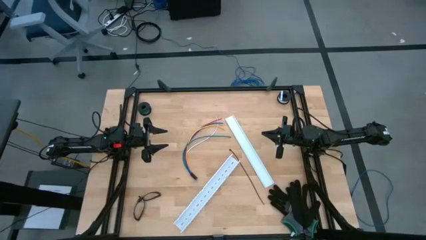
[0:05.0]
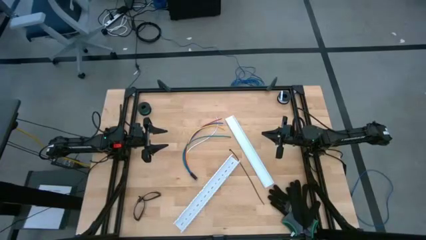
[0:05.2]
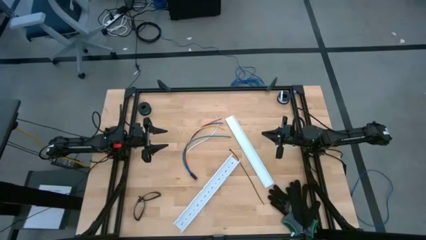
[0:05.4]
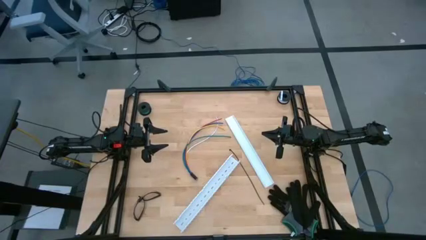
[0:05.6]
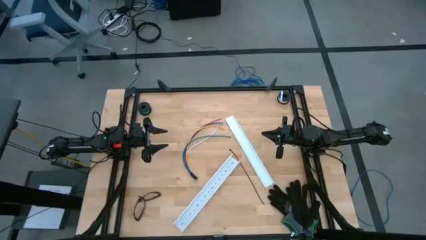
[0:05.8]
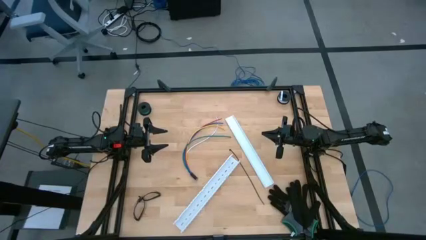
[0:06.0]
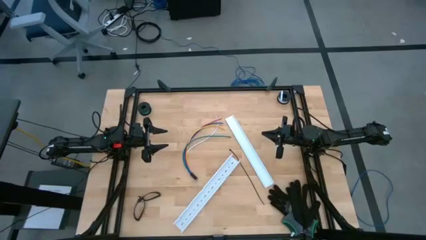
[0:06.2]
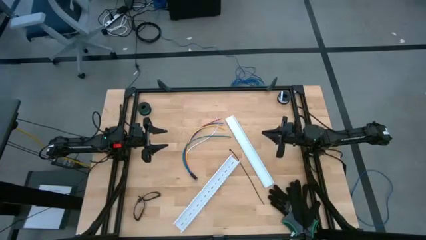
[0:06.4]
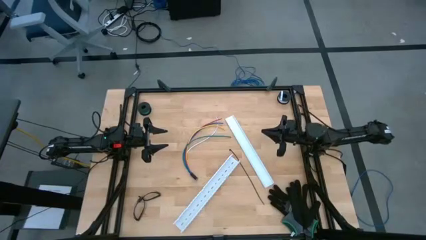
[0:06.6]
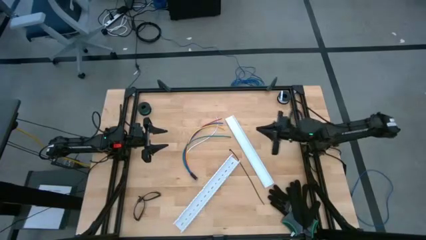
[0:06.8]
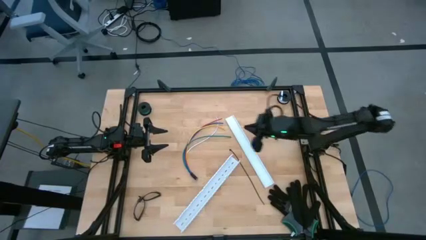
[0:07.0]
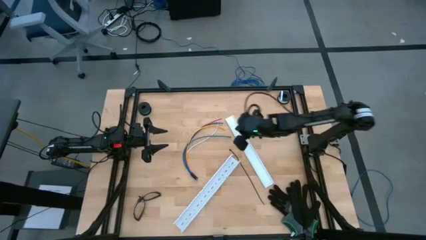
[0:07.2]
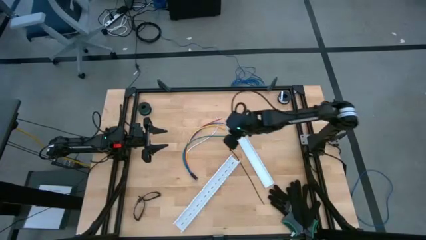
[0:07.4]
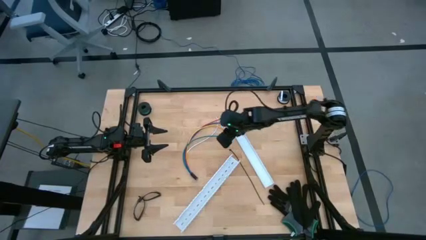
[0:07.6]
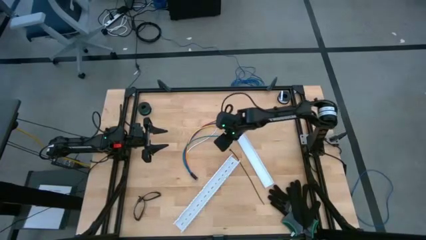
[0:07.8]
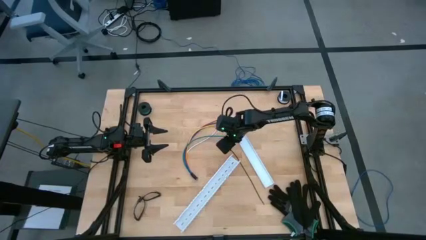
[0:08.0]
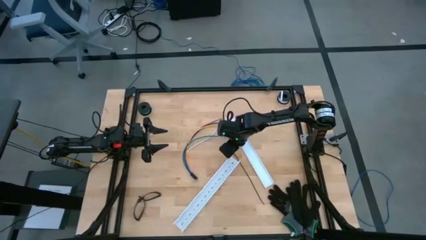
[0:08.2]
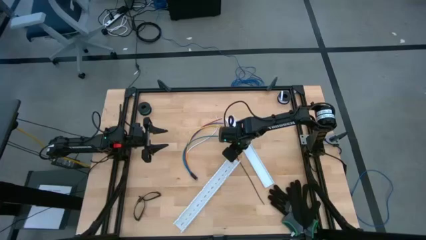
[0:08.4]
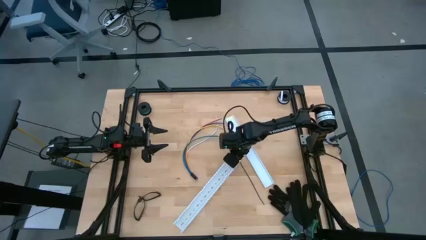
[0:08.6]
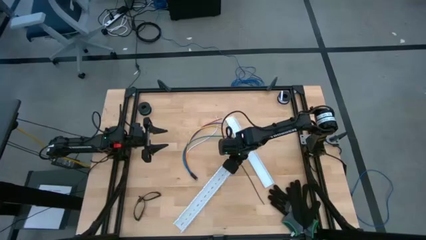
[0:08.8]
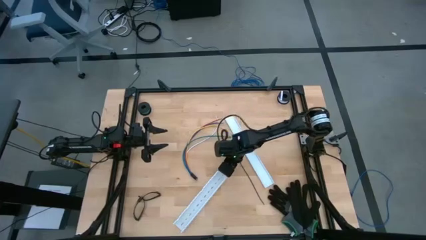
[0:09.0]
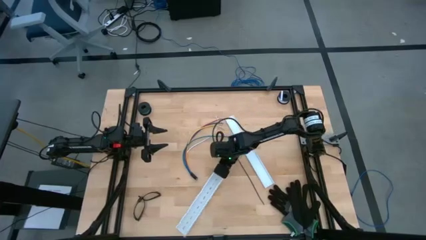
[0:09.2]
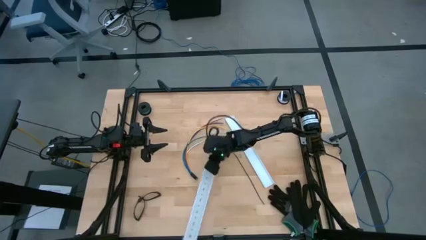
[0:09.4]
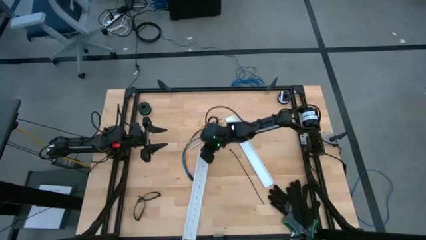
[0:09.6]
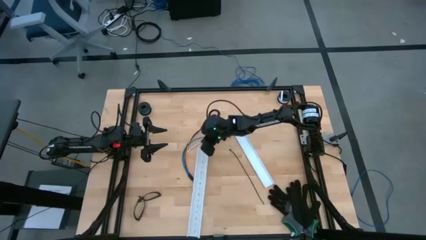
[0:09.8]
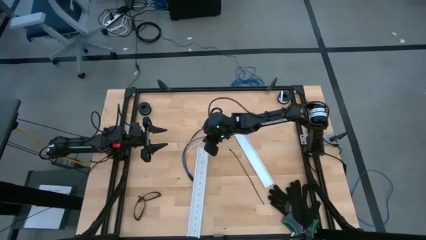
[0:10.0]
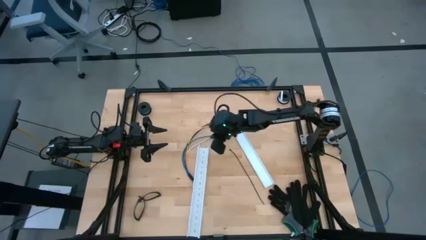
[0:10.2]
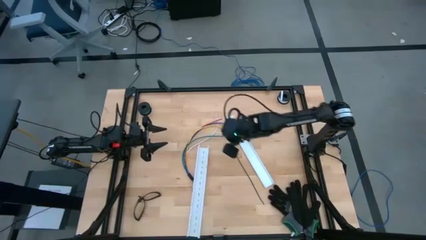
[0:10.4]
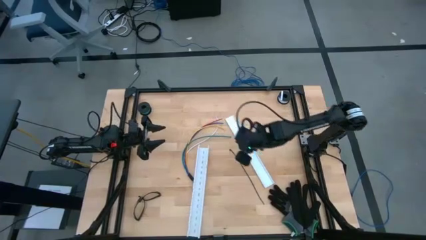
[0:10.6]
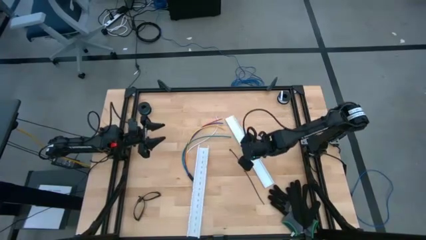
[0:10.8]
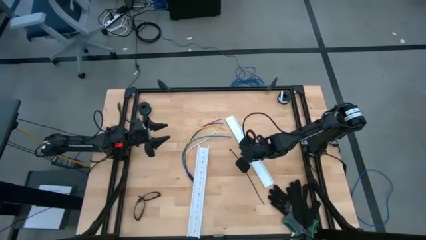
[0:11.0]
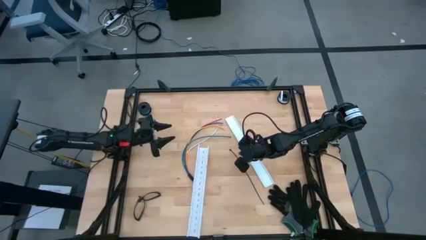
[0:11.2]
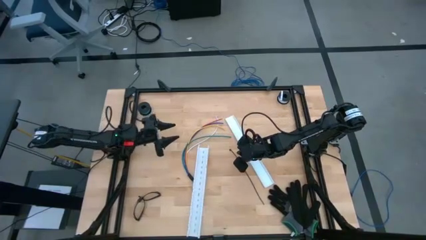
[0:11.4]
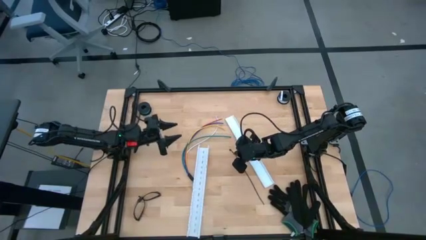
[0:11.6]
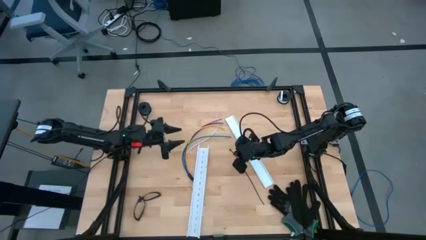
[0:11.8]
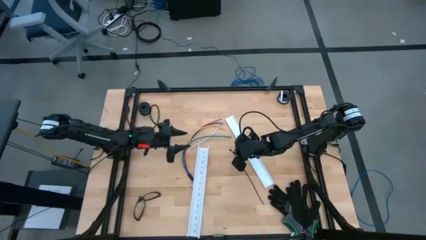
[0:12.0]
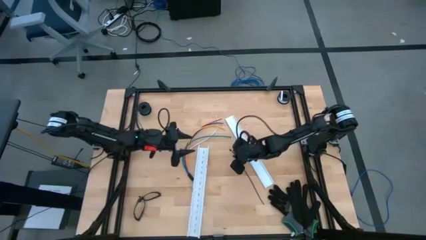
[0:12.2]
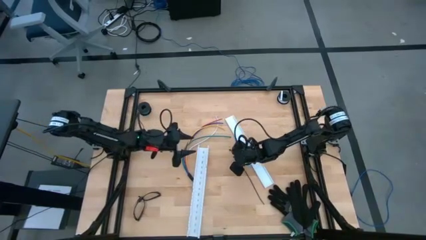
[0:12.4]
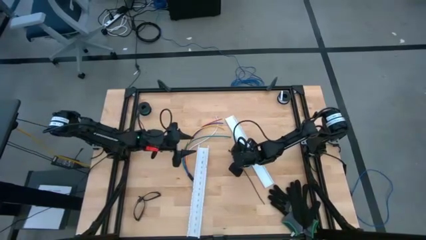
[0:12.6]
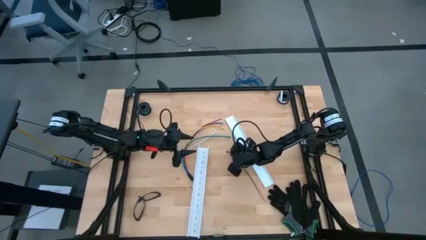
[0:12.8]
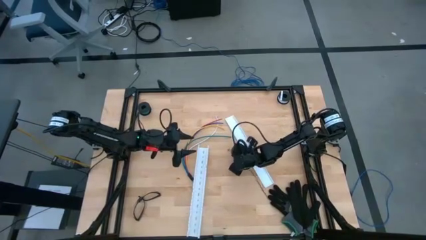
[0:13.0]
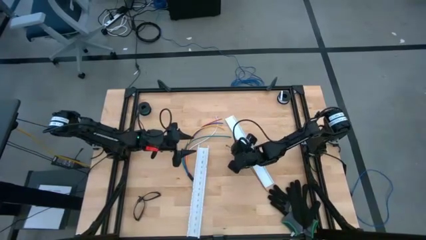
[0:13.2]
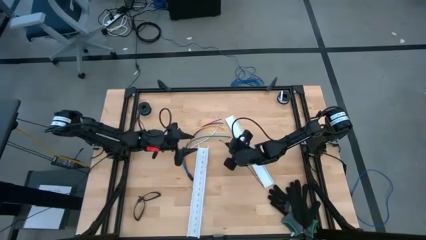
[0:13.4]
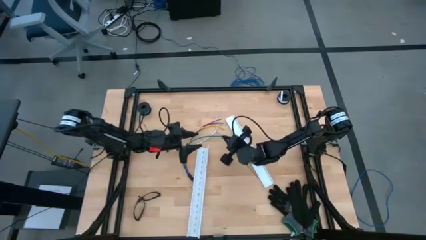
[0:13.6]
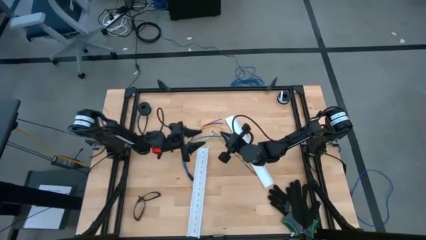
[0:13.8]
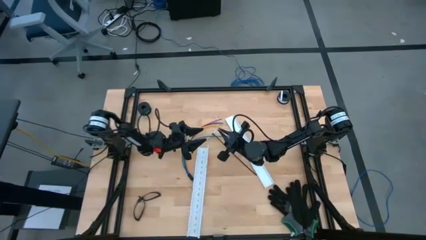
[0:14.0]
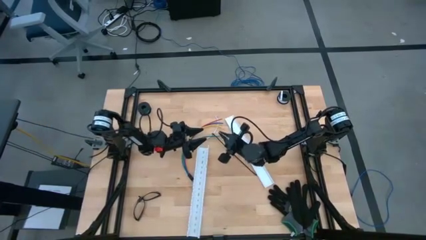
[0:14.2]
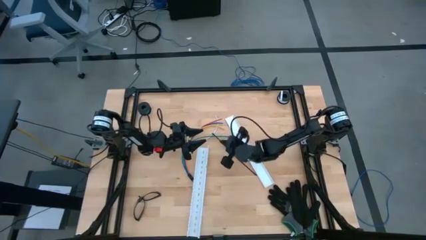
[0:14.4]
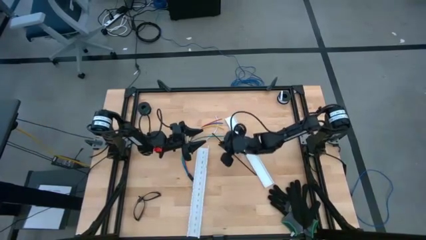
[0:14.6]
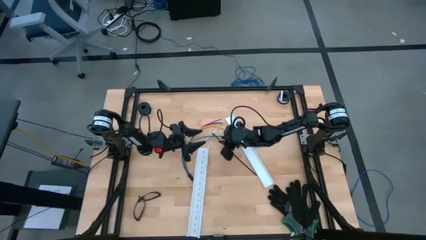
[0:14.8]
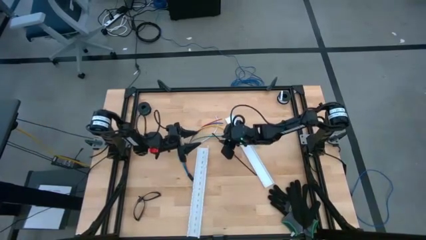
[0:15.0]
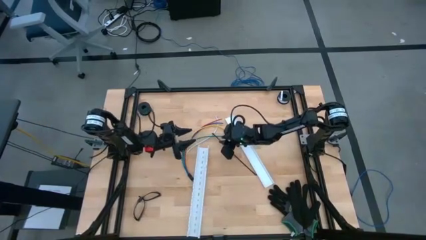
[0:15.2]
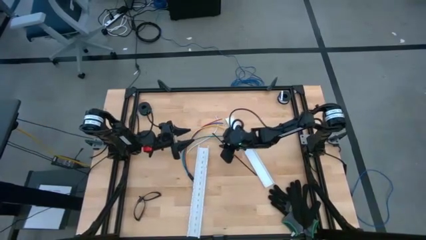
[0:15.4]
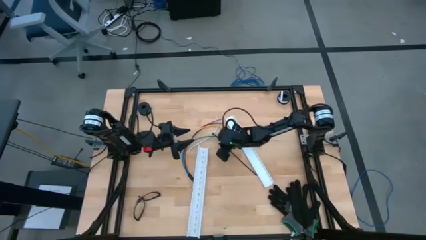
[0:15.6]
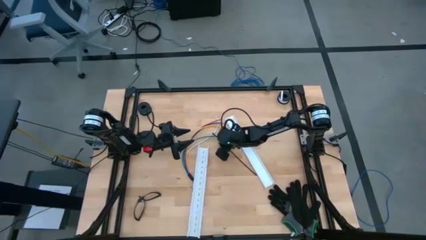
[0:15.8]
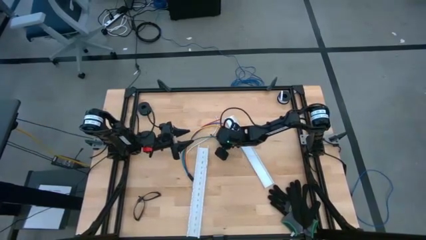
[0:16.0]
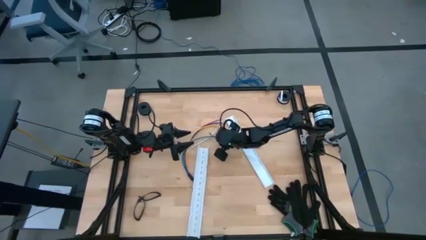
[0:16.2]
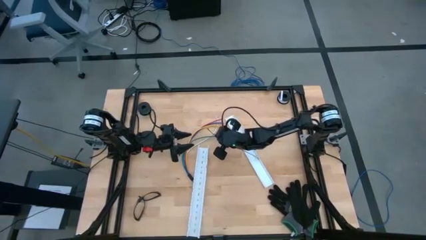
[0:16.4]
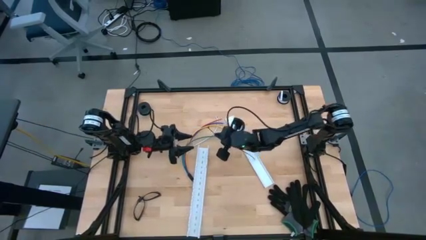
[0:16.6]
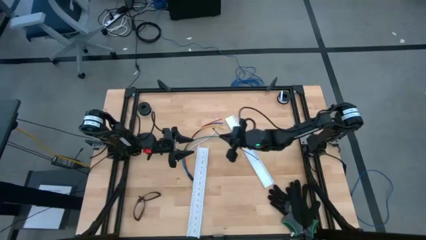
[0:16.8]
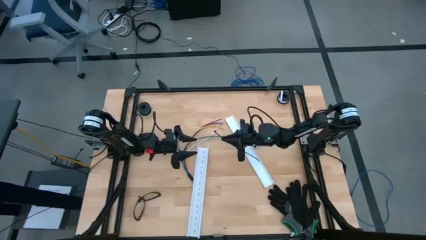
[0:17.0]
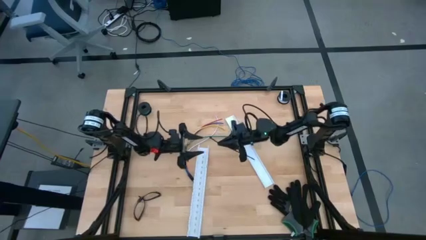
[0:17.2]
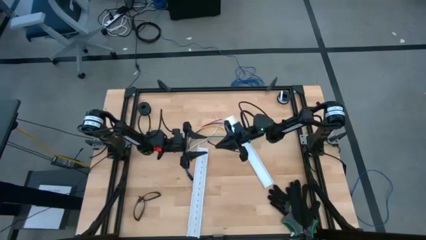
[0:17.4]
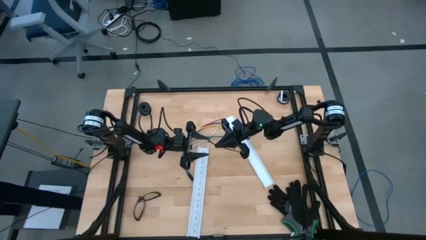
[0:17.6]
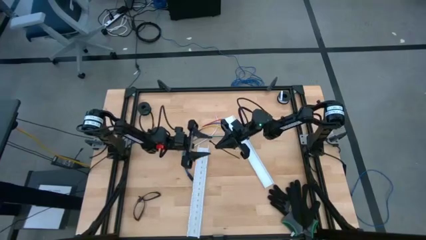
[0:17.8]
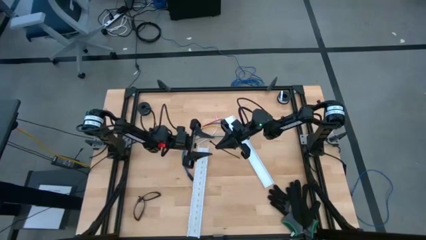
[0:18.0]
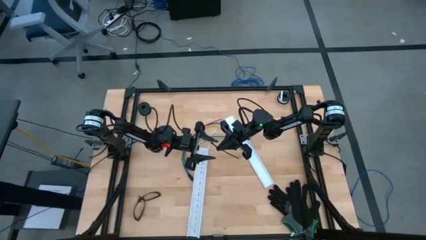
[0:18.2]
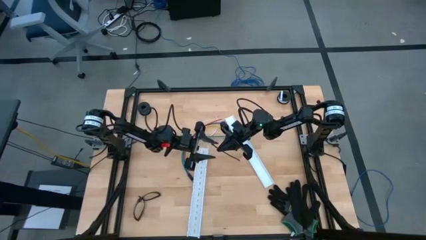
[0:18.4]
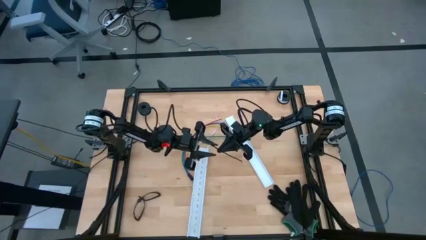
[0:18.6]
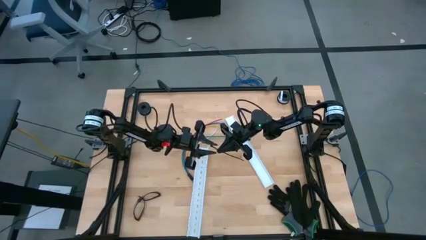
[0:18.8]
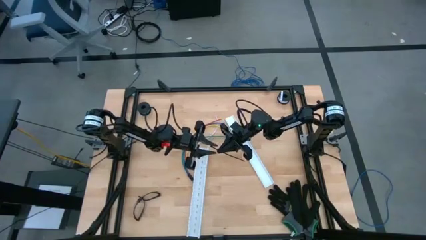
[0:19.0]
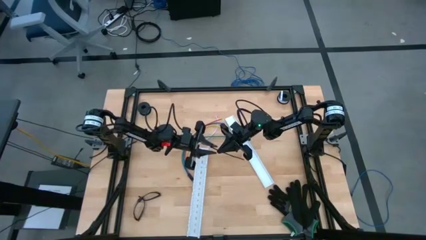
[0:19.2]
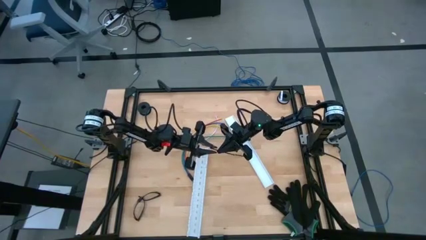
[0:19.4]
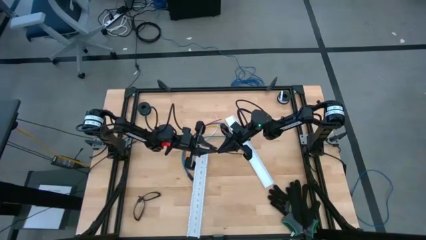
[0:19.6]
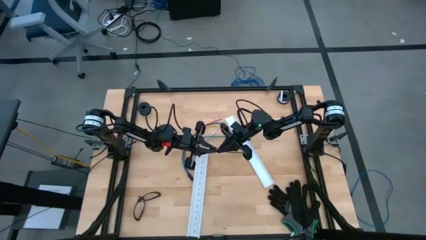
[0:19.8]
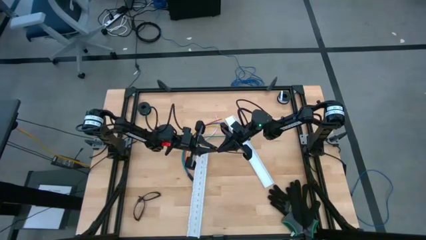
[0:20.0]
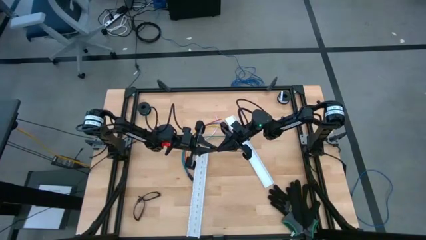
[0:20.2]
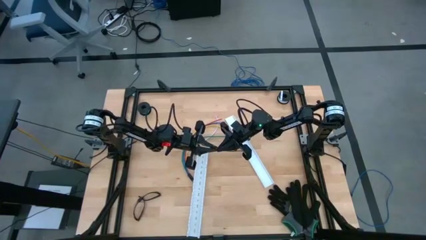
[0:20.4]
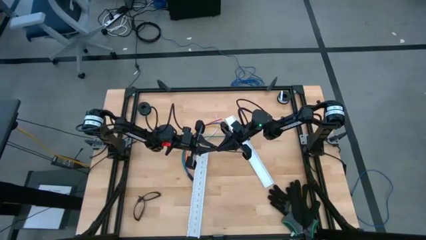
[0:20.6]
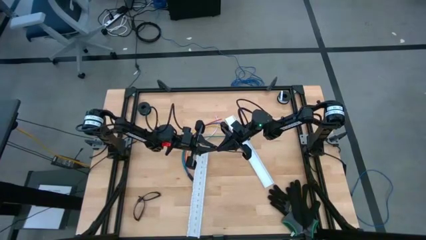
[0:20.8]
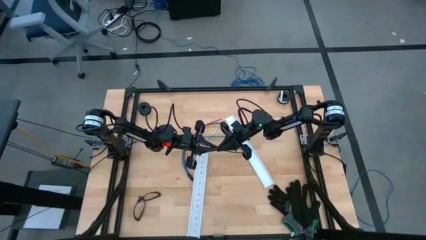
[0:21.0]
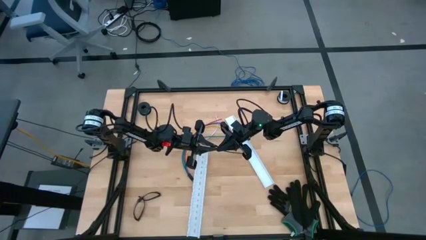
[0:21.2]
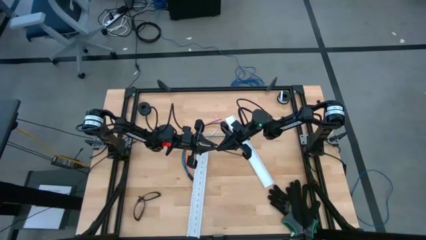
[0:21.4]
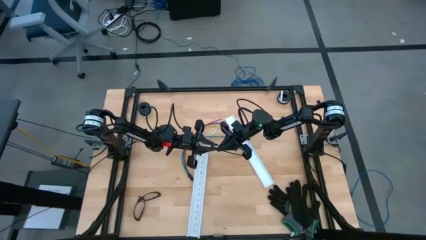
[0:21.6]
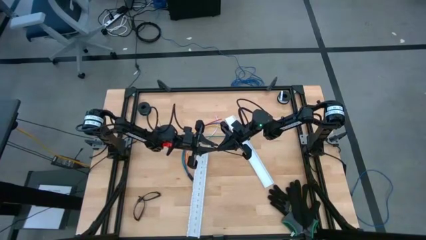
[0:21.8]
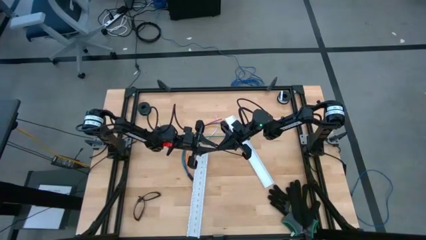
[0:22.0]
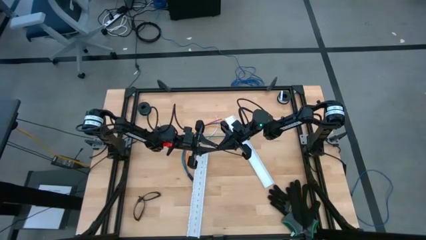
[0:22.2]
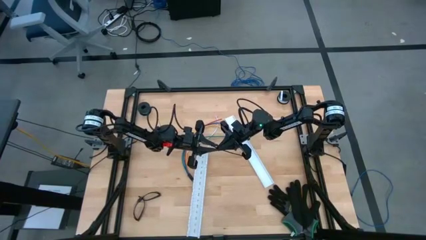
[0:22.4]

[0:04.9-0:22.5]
Task: Ziptie cables
Wrap the black zip tie around the object
